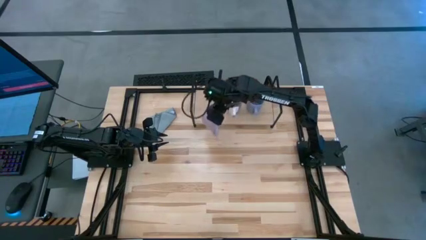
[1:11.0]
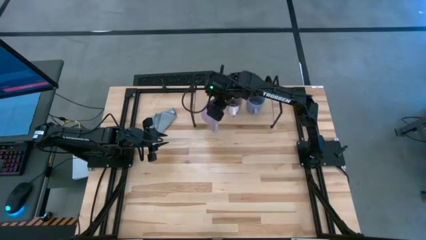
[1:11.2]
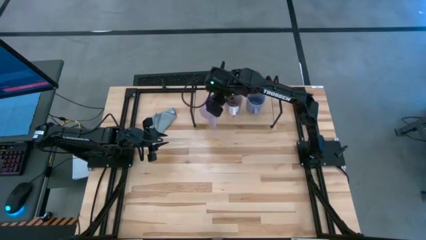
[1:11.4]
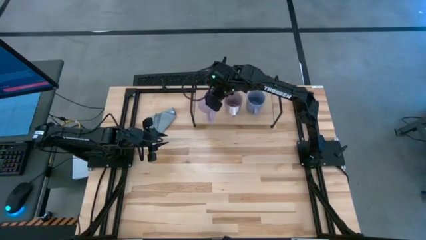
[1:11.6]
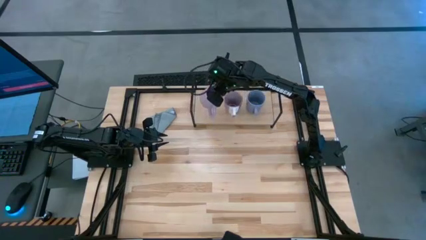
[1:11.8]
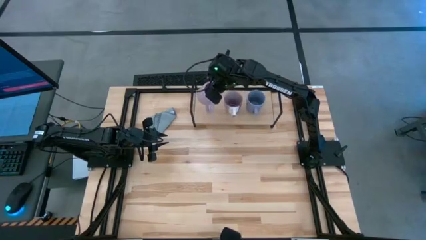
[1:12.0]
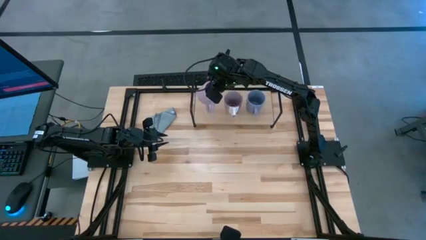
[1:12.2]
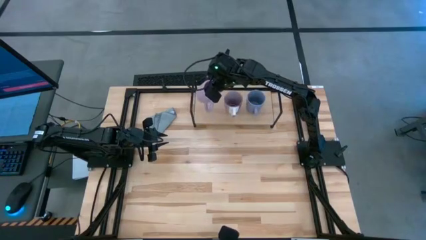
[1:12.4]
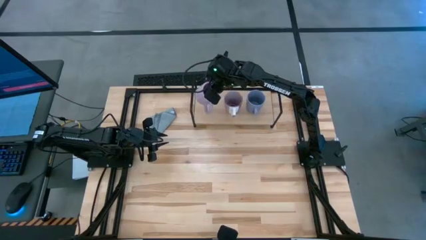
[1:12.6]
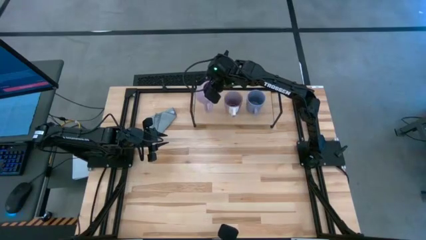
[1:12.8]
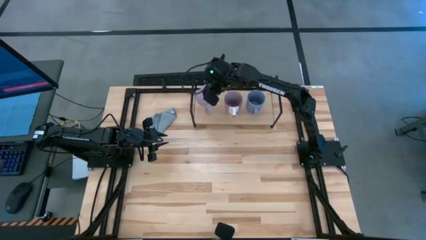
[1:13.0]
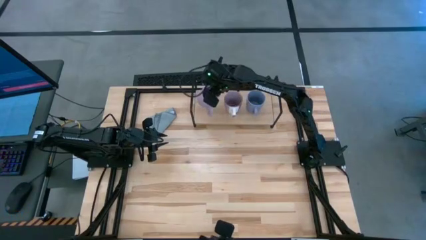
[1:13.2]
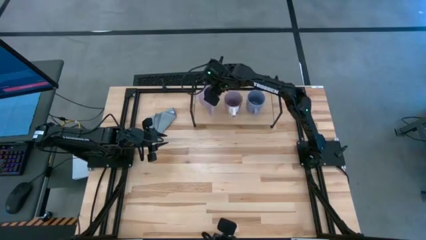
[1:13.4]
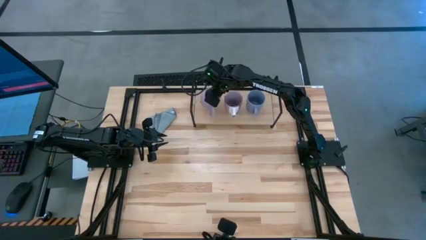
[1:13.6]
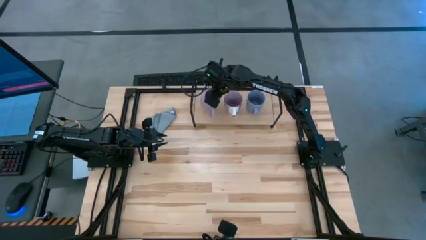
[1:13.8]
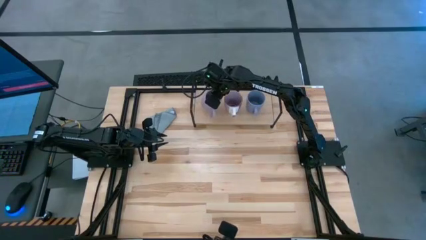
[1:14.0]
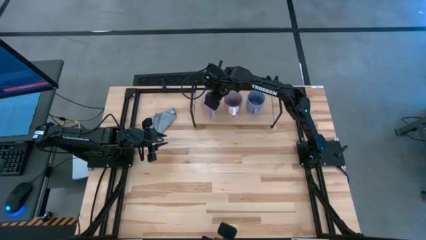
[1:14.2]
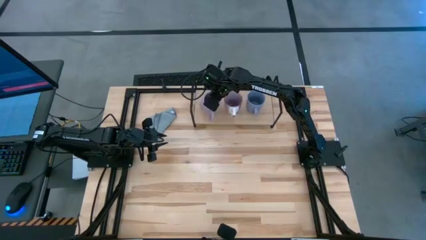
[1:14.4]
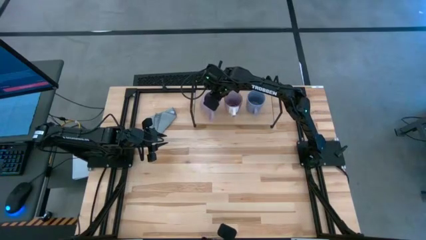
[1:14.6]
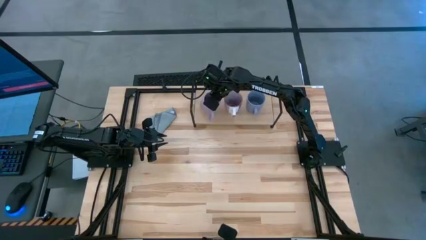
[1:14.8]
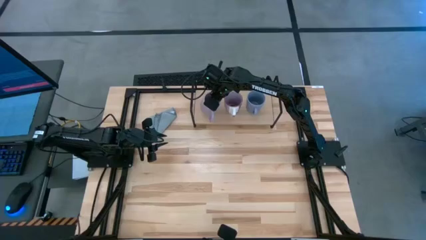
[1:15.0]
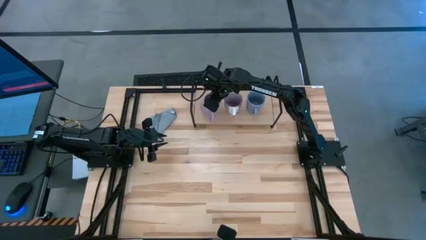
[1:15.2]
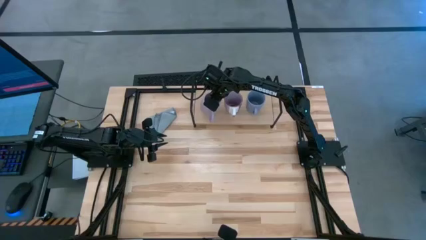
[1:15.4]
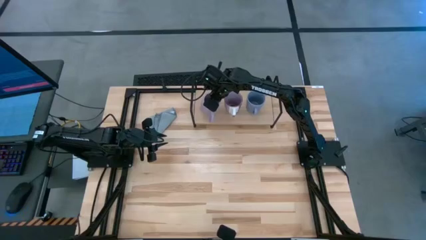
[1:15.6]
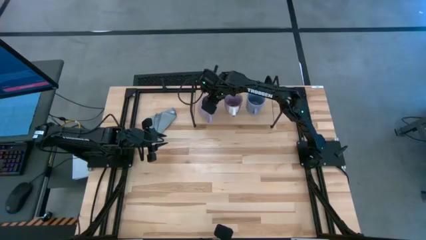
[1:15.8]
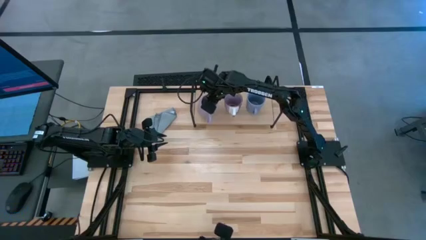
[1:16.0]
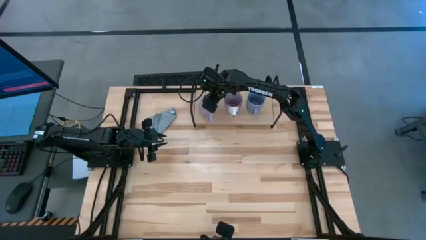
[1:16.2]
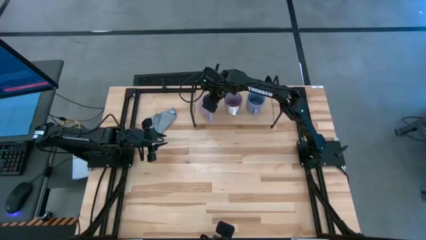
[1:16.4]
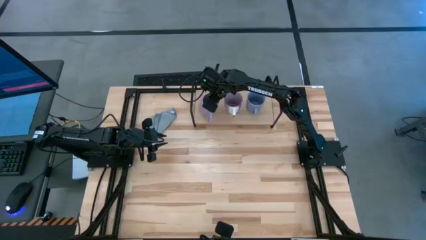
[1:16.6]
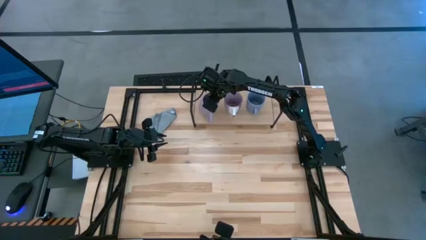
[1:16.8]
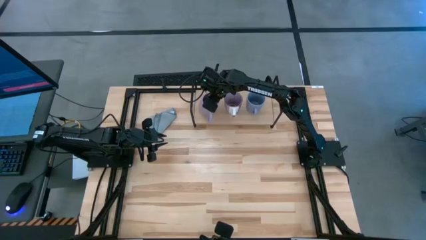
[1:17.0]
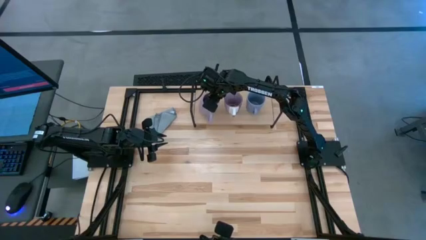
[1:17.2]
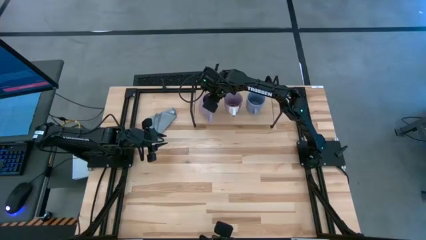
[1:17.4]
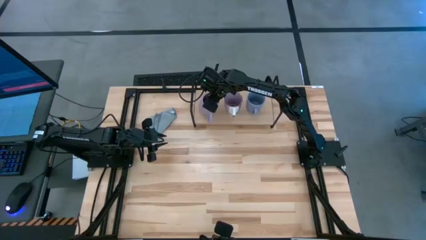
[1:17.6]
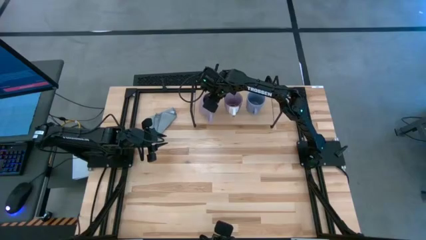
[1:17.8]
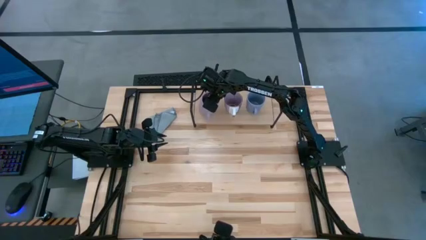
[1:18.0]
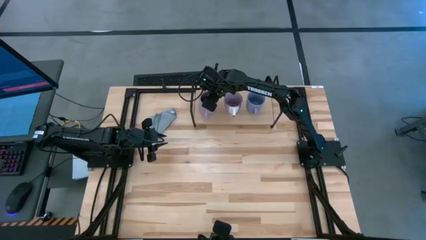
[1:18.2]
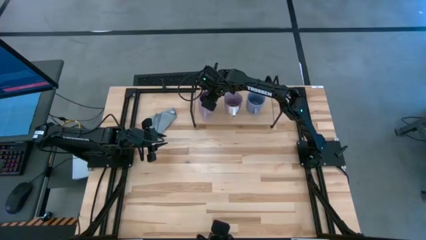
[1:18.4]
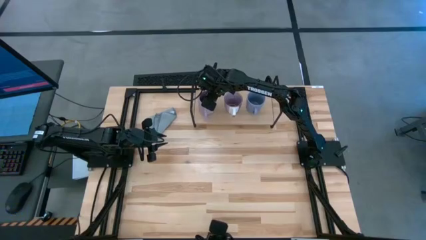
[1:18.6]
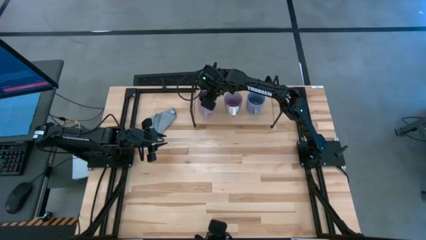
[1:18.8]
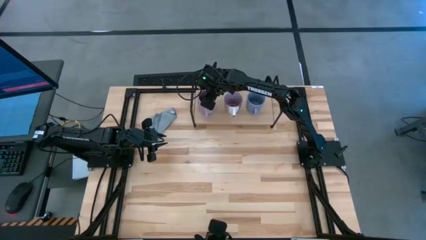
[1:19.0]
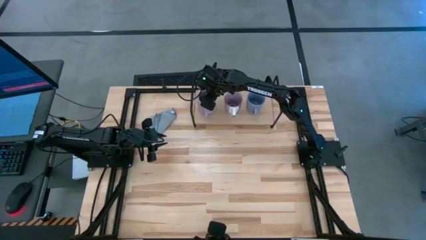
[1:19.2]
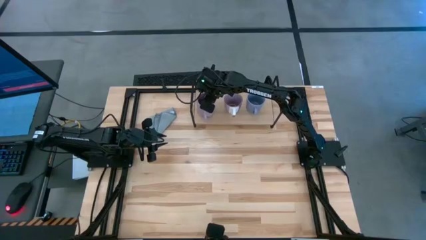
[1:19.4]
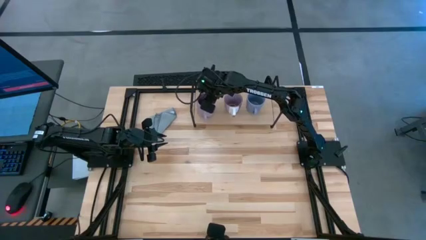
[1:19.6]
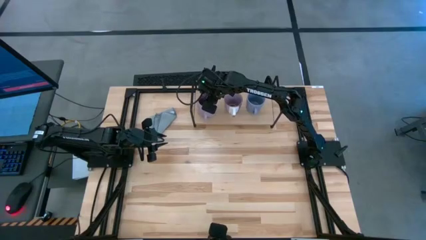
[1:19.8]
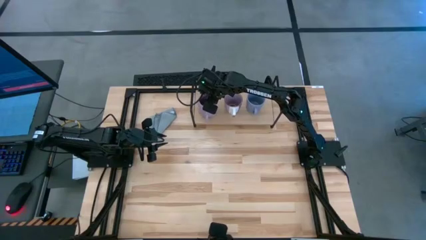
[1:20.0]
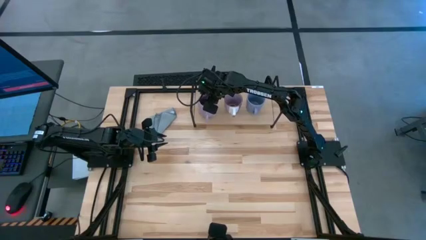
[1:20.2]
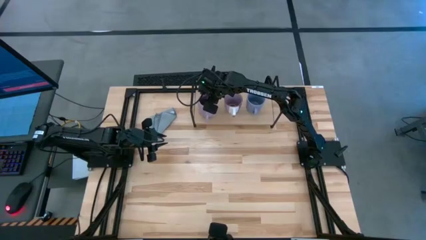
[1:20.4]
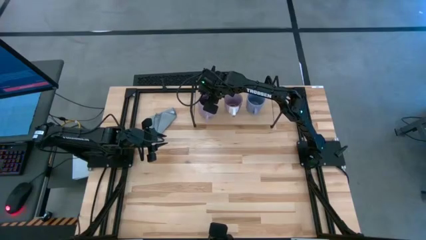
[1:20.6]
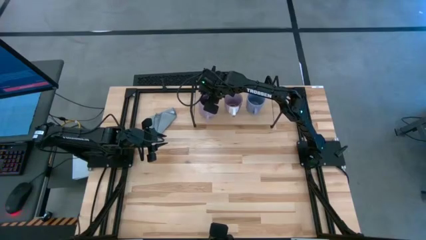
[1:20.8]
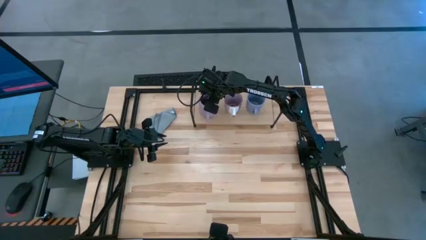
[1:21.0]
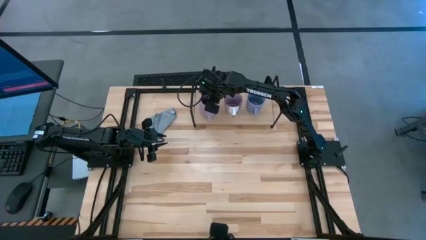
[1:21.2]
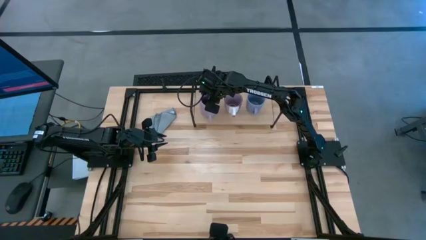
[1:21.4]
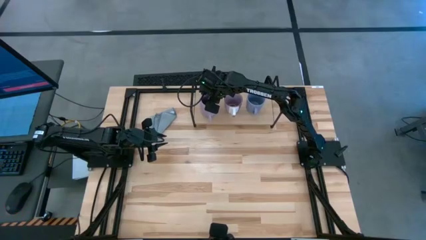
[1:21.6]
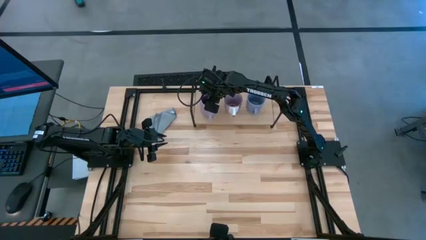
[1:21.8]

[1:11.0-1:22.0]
Task: Stack small to large cups/mugs on shelf
Put the purple cup on the shelf

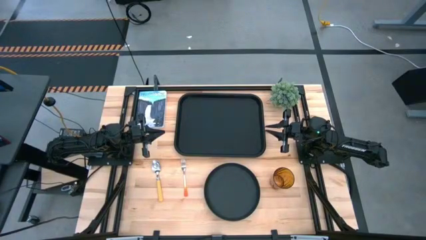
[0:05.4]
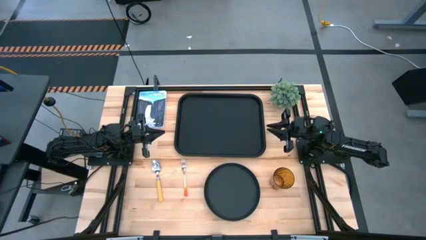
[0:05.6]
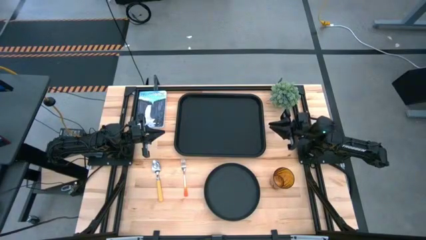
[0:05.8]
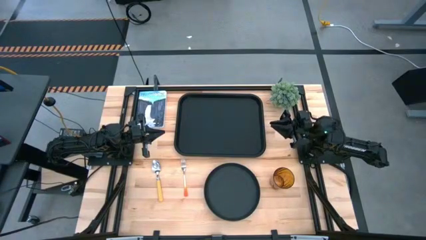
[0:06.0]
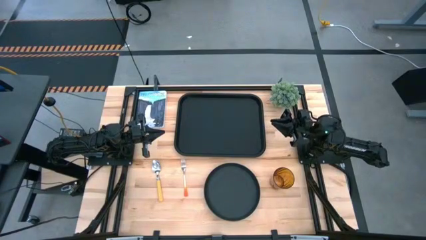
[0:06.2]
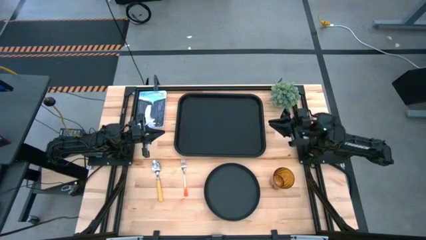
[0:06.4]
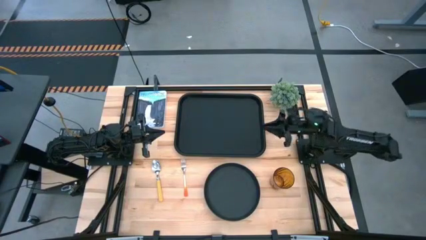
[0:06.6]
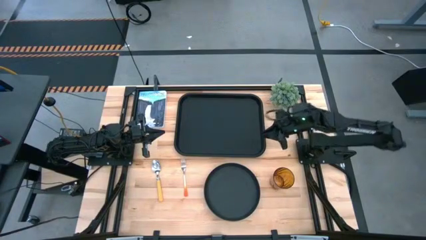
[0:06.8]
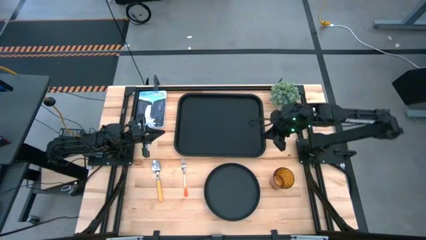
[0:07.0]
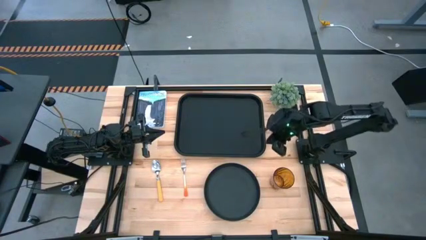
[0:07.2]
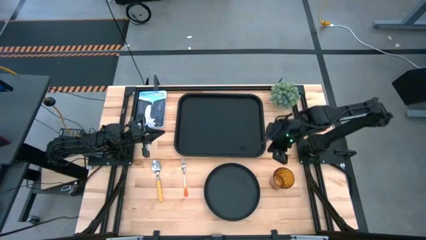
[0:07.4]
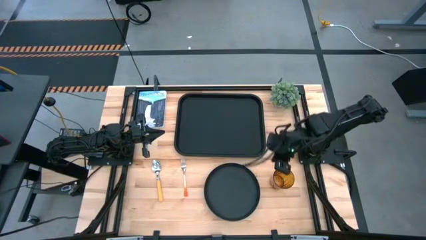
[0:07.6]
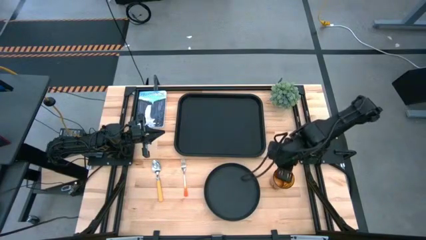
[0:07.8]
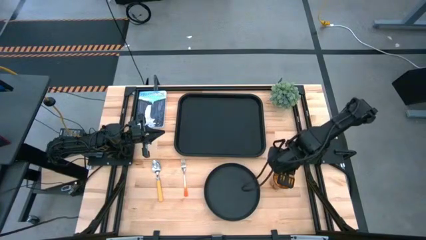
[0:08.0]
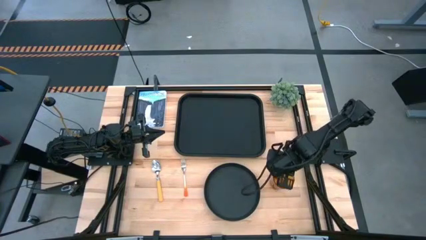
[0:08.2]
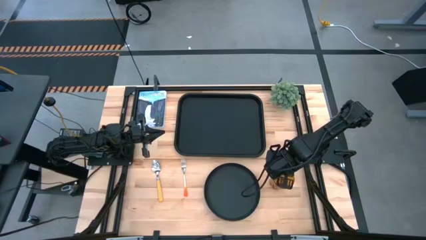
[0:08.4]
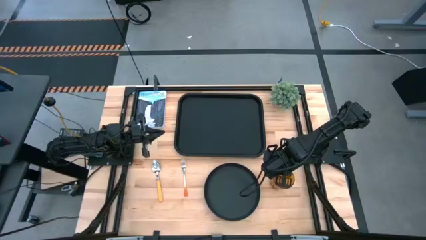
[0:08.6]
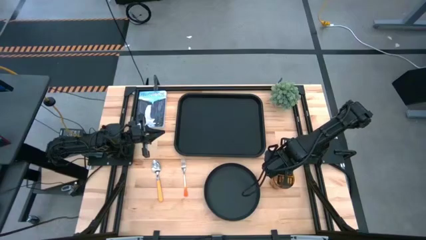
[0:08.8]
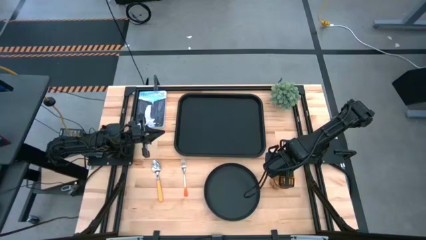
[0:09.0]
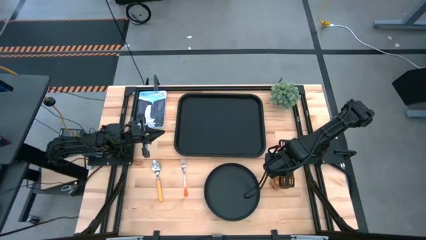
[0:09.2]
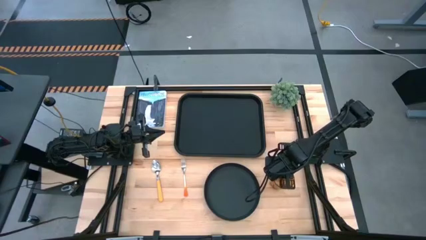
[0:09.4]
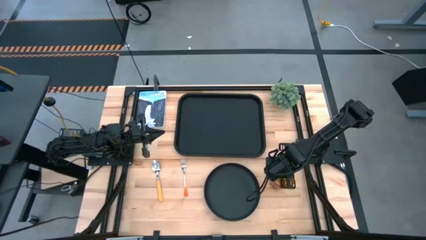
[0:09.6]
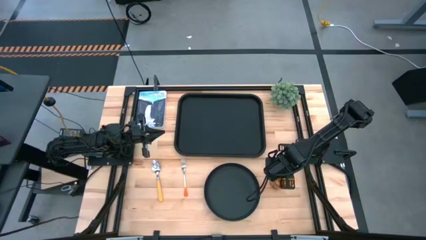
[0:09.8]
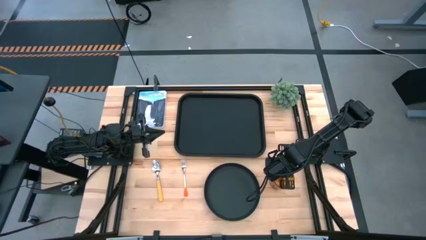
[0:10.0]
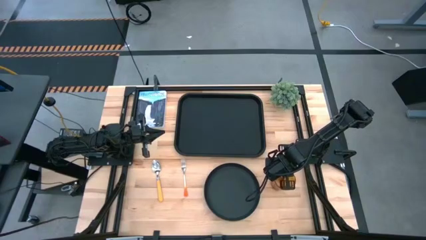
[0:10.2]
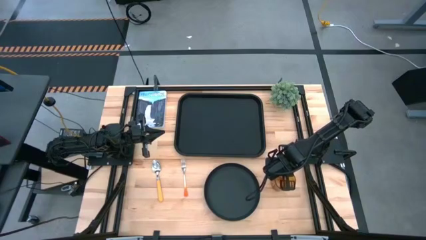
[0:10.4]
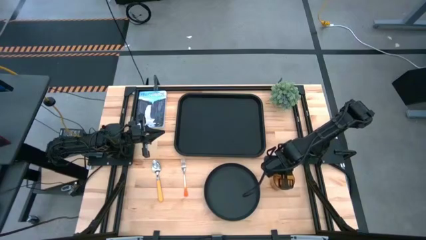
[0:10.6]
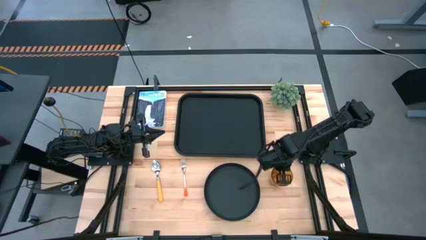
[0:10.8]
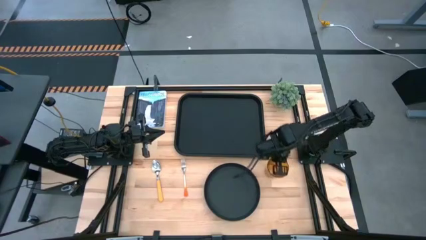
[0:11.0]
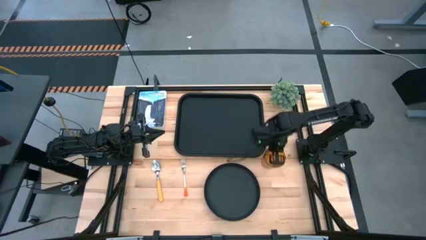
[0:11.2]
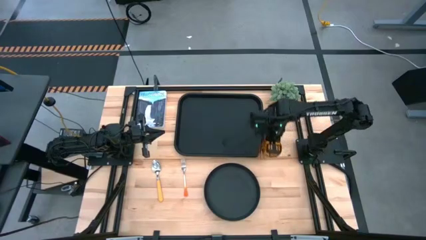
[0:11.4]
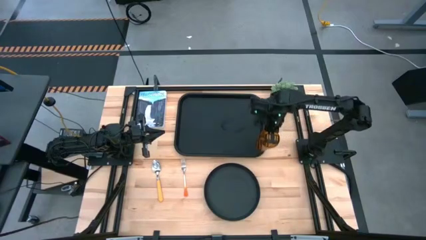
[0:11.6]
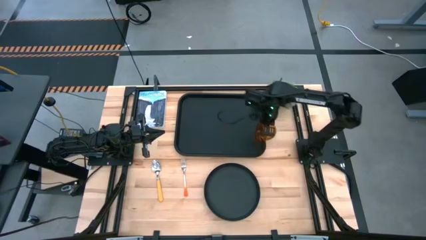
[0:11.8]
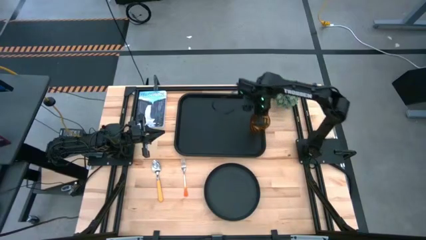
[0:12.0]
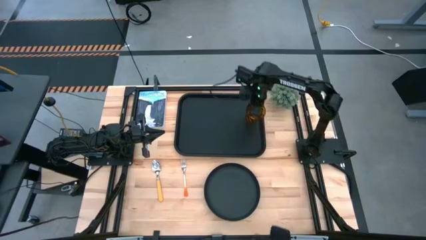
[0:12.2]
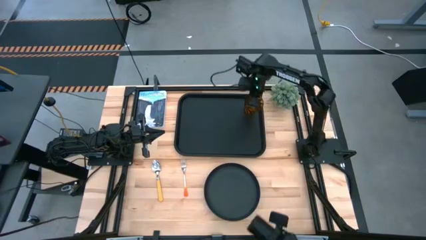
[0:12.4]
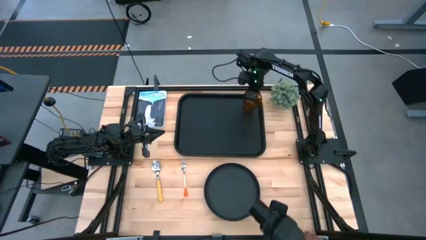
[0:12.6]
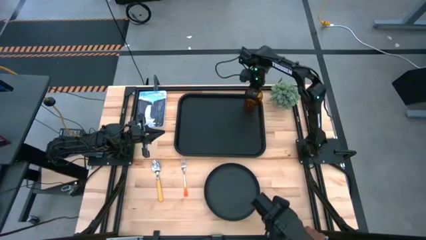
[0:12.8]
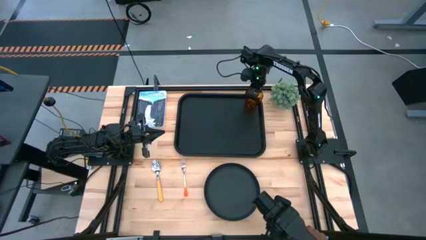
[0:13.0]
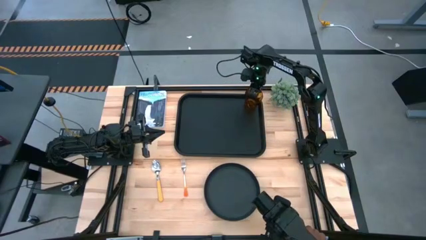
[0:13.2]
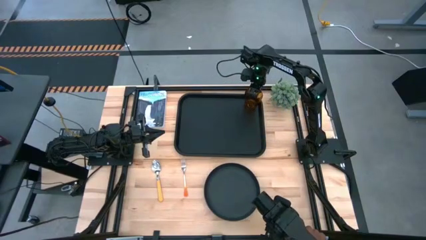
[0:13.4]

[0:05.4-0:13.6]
Task: Pick and place plate/cup/fork/spoon on tray
Put the brown transparent glass cup on the black tray
